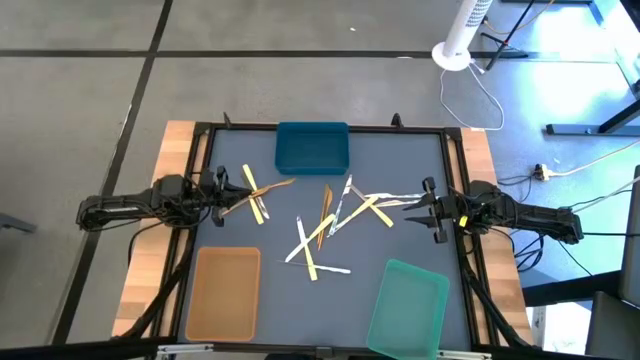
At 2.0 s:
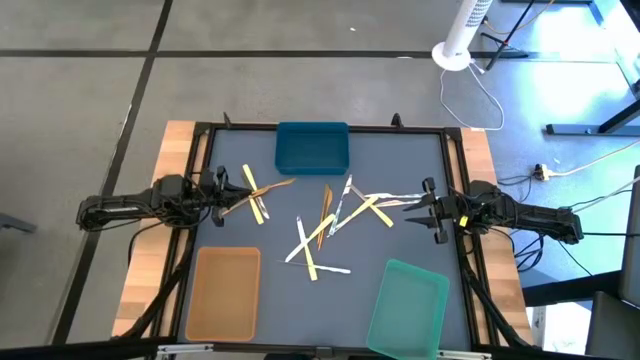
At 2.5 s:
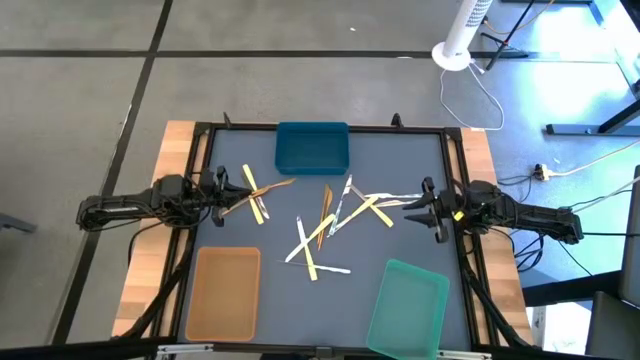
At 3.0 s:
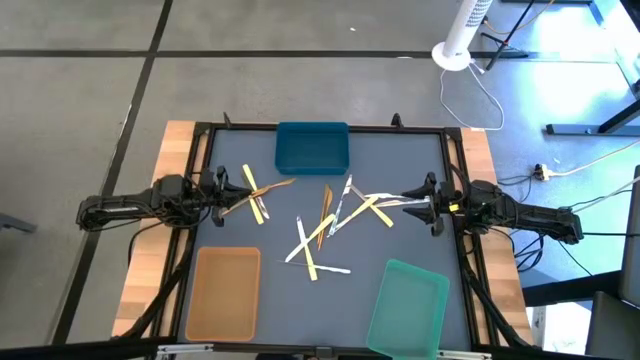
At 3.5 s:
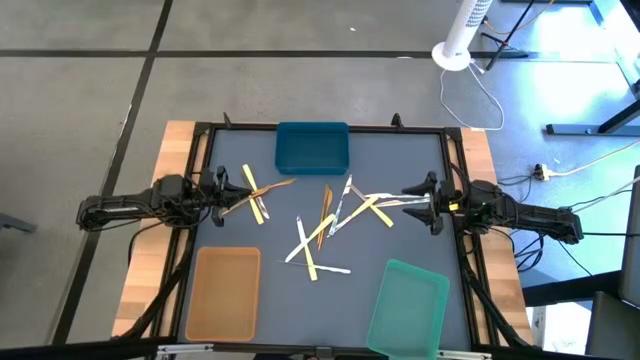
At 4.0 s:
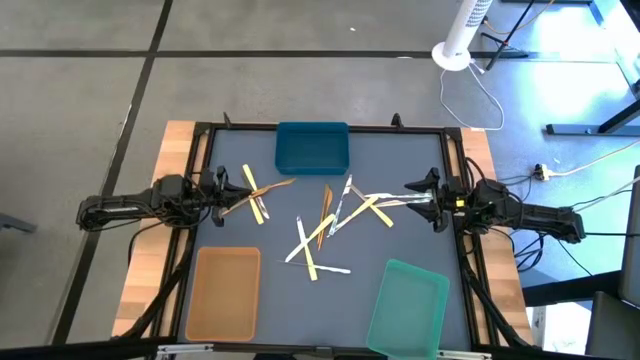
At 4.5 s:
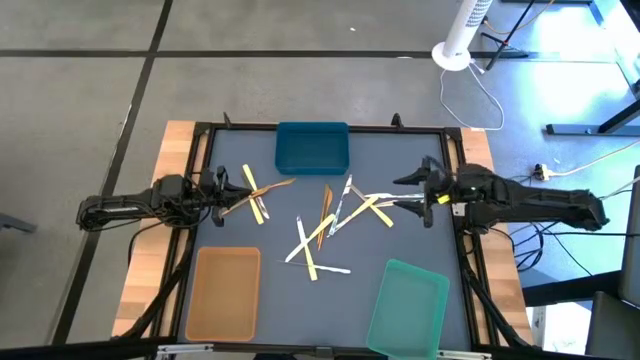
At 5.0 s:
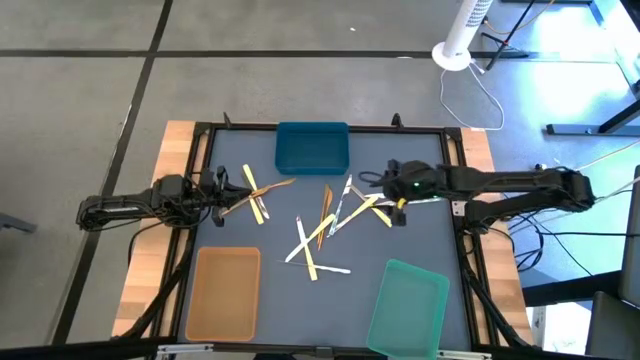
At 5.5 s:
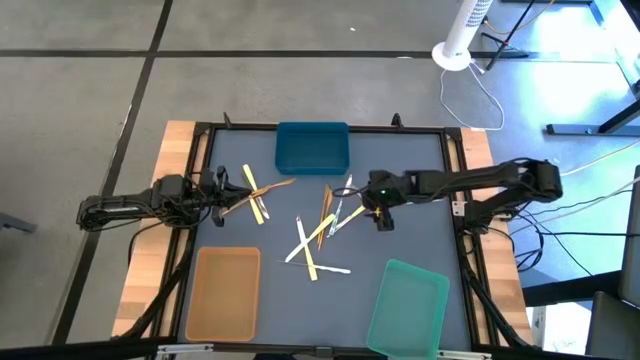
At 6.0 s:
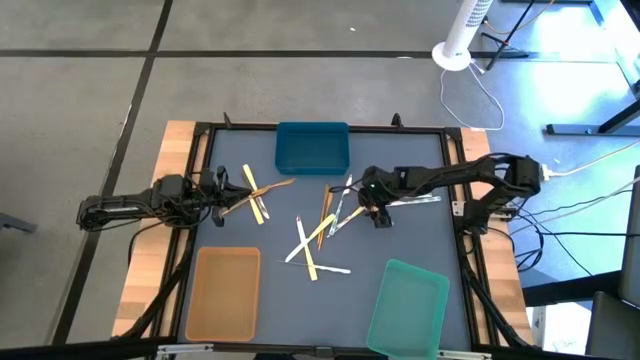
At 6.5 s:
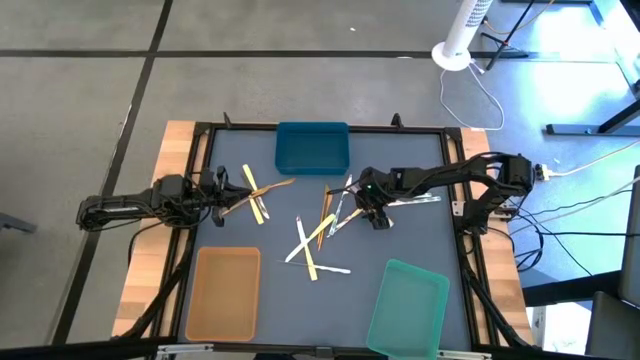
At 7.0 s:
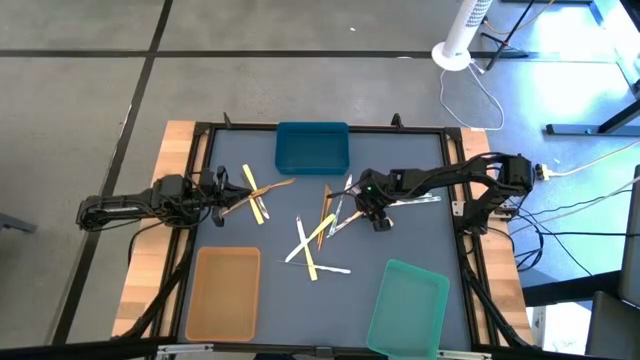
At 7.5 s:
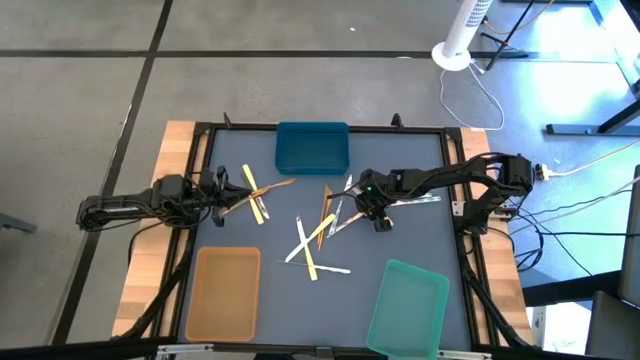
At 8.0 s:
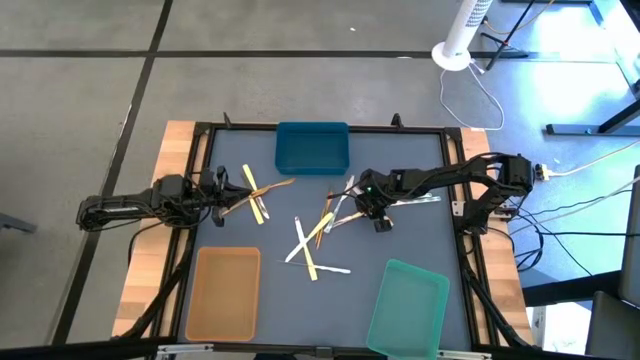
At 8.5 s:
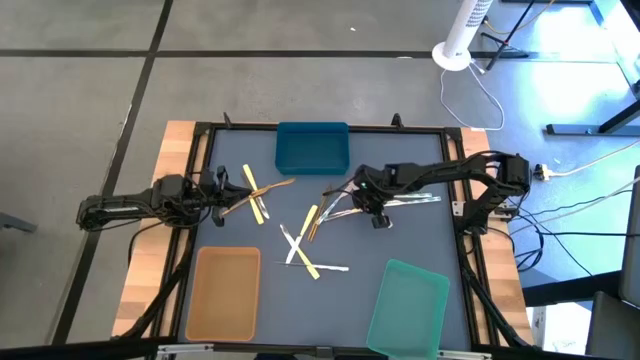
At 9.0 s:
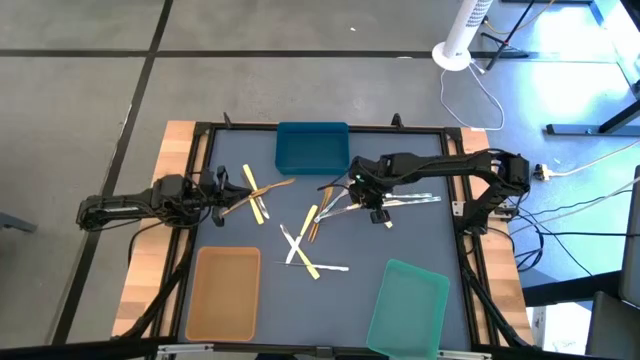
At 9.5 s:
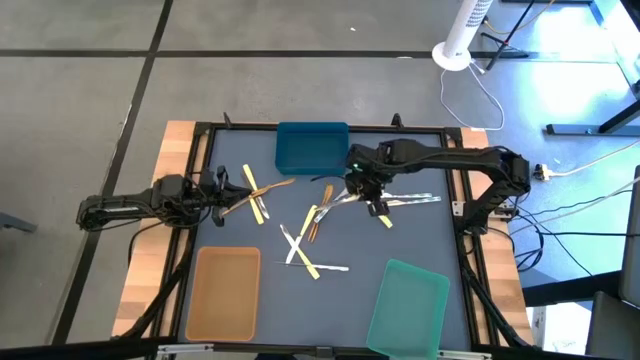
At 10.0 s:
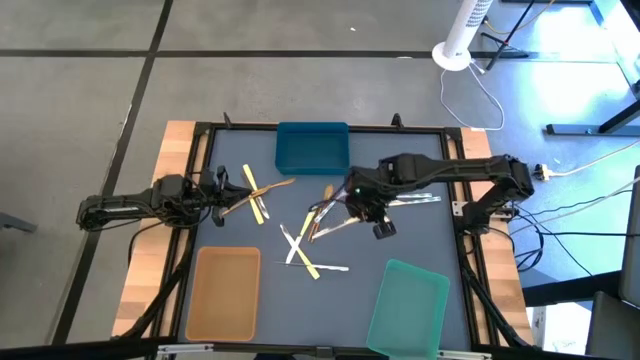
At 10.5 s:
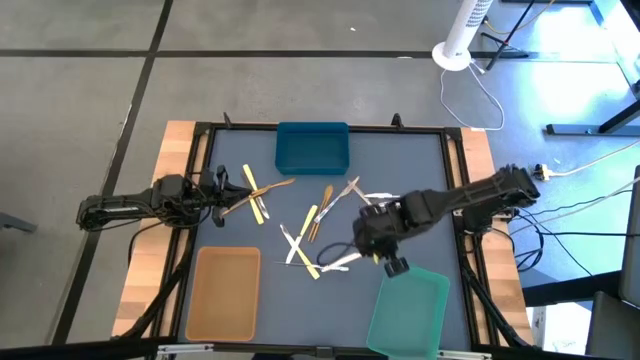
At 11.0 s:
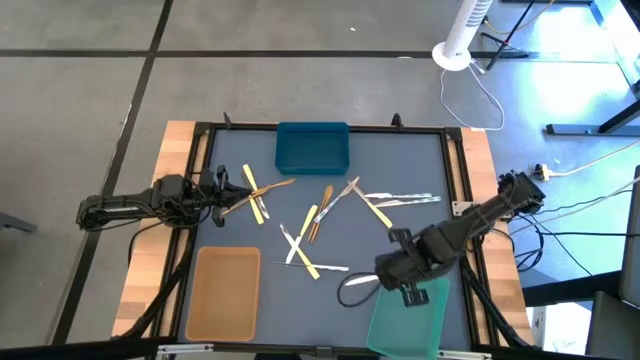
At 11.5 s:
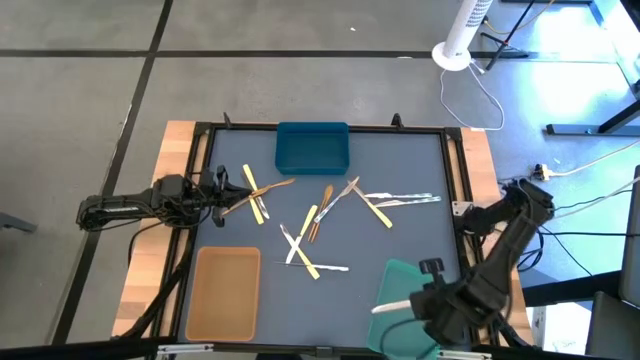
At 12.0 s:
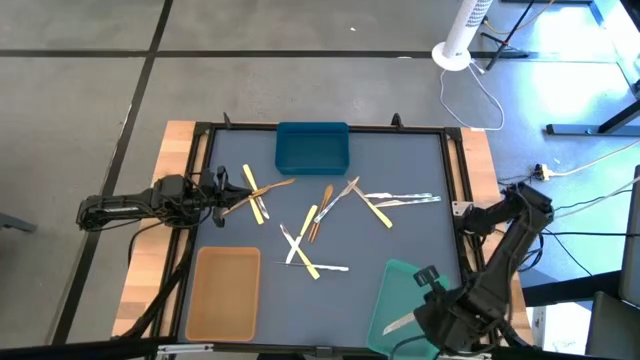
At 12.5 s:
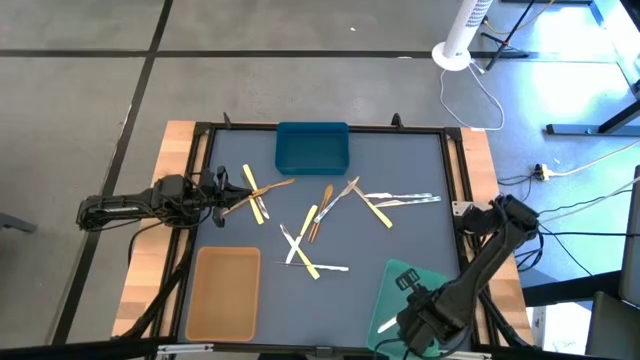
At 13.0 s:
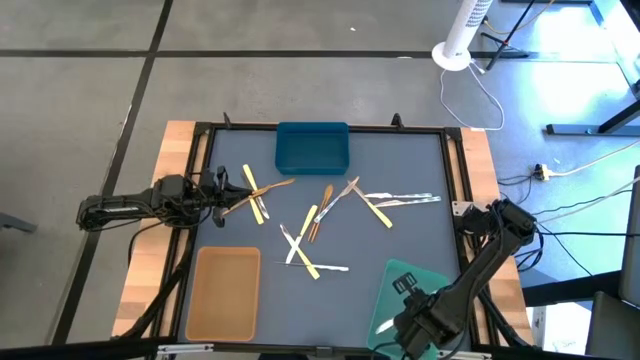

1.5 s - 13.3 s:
Task: Sort silverware by color (type)
Put the yellow knife into the green bin

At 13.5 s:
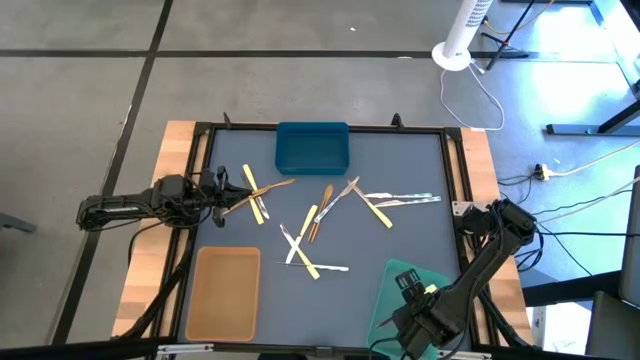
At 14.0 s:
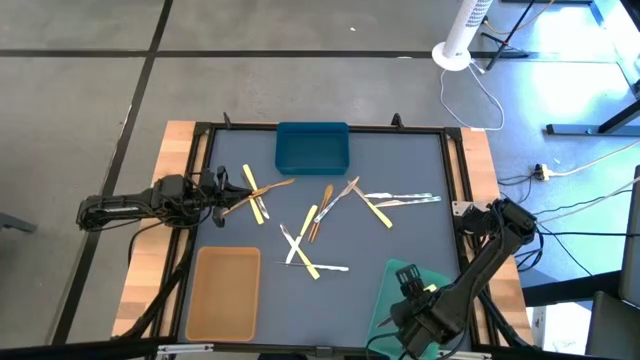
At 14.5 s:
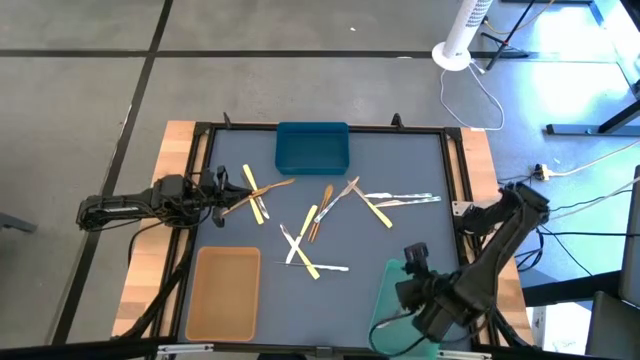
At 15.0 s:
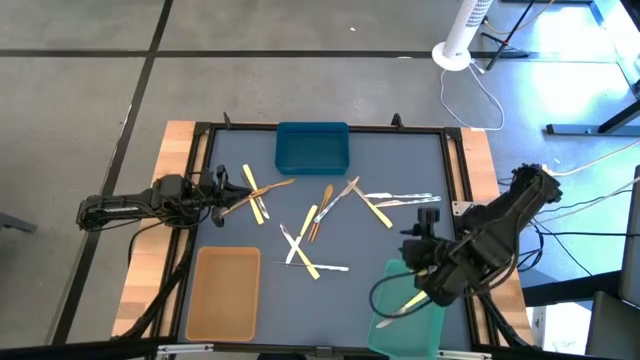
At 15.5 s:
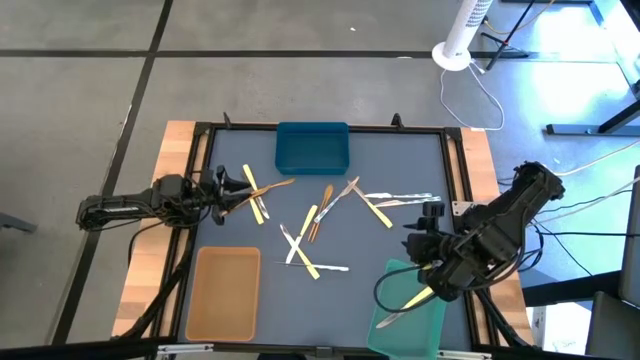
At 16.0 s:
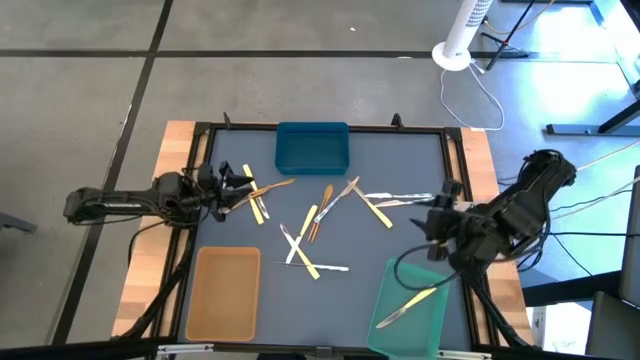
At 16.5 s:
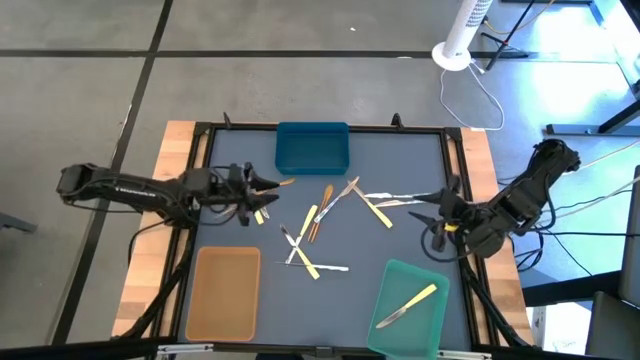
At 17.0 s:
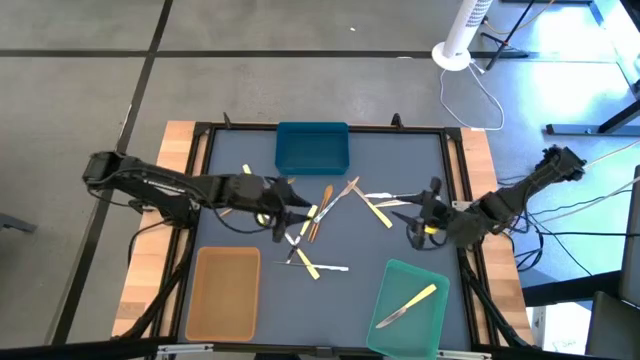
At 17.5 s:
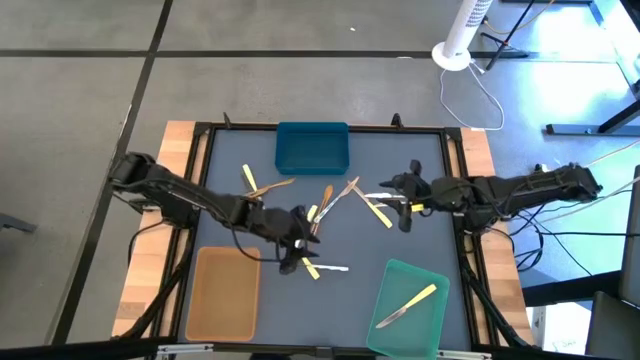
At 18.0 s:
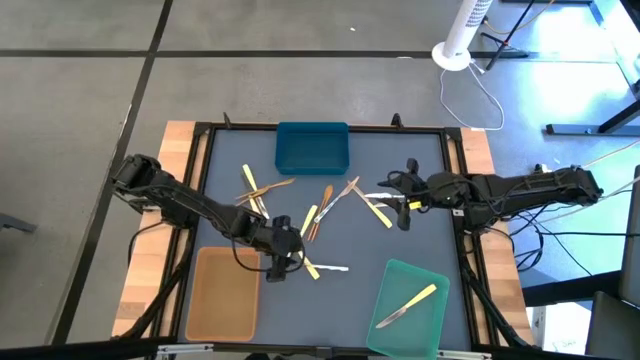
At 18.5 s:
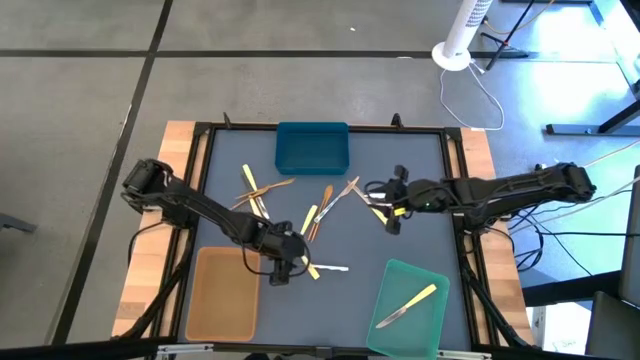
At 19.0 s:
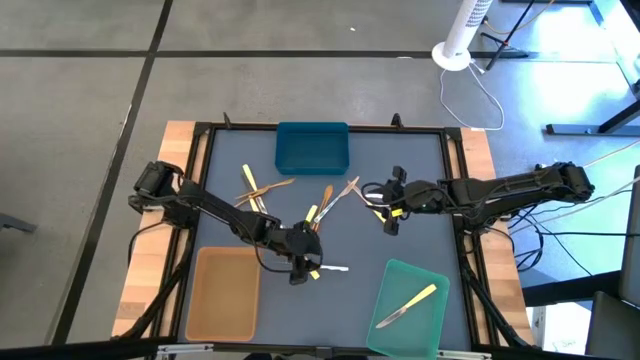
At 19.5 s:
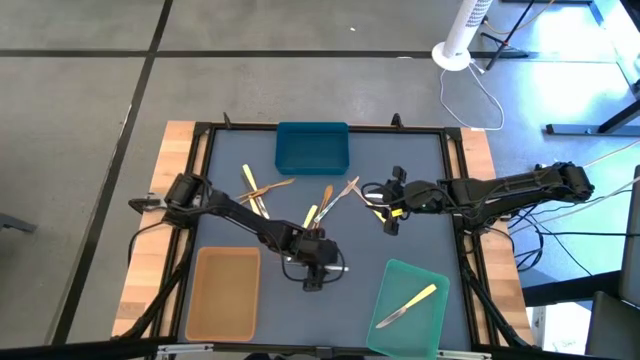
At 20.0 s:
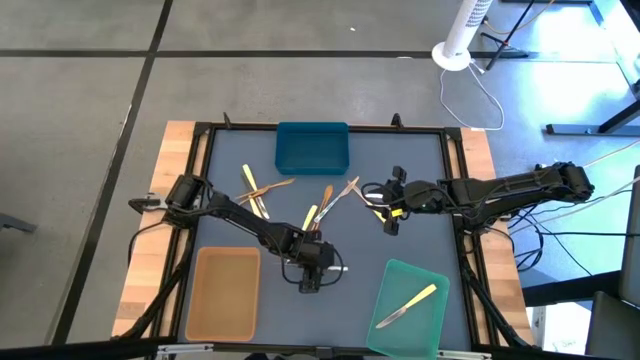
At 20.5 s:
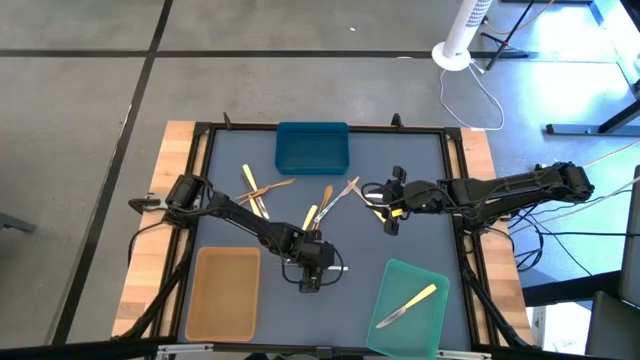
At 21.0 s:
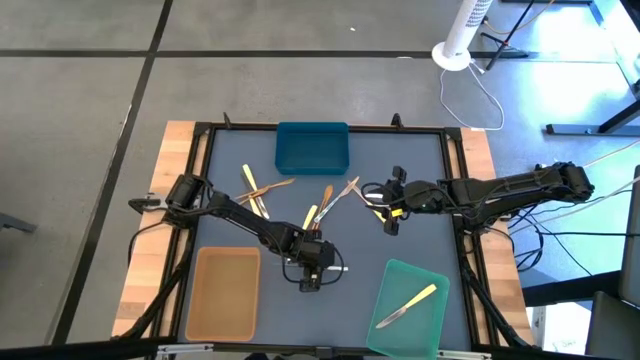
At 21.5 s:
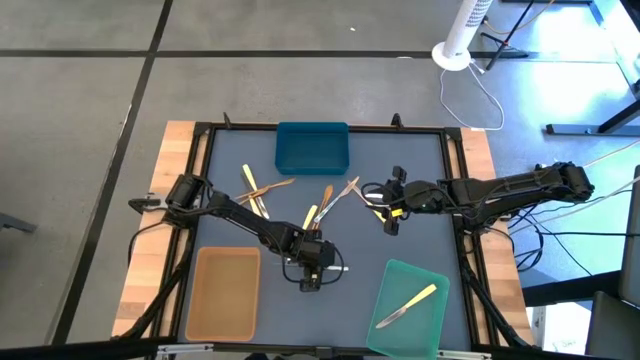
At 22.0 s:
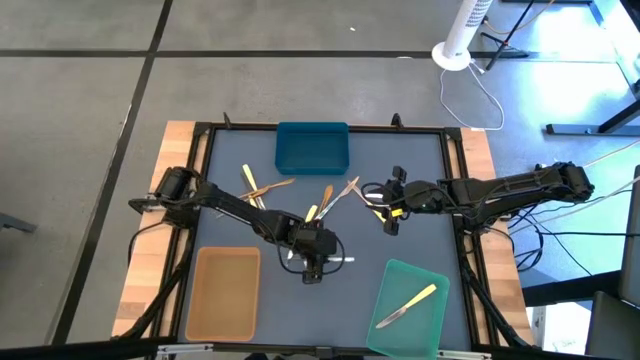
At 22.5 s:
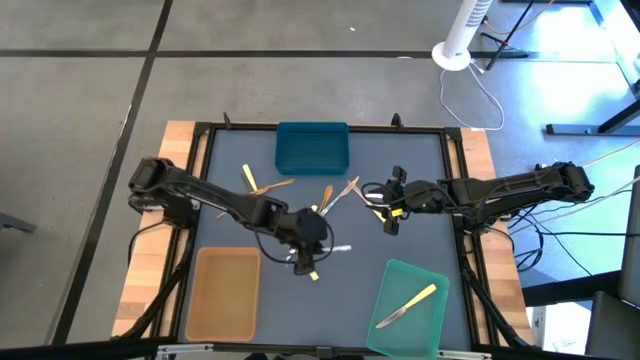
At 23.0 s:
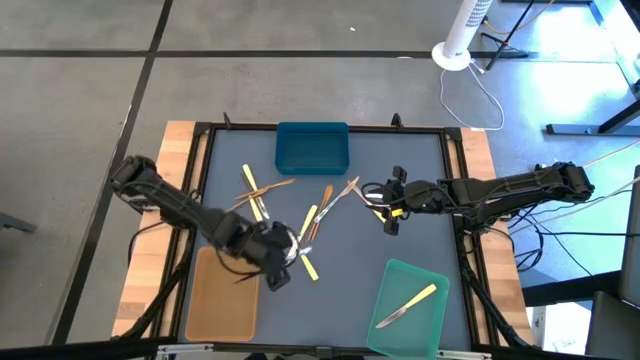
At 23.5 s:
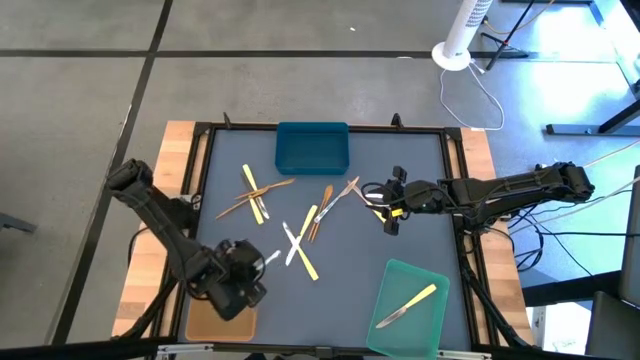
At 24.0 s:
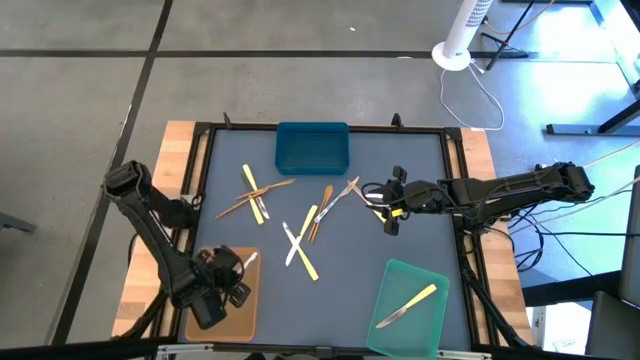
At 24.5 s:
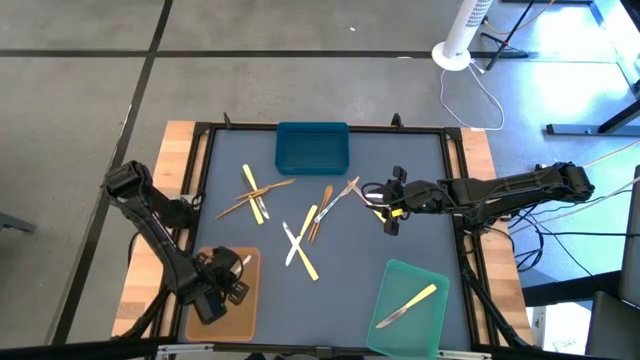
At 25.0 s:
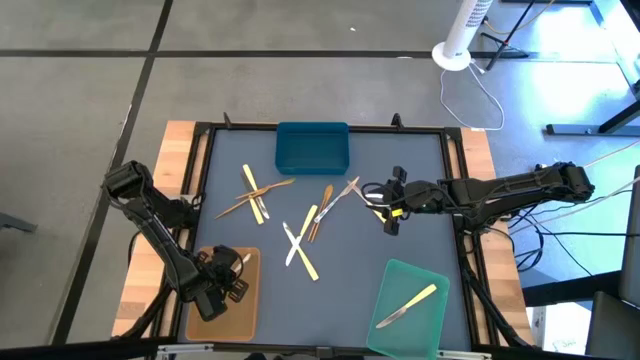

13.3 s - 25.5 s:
Put the green patterned knife into the orange bin
